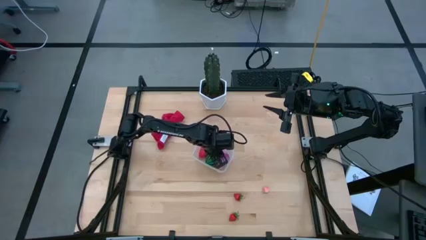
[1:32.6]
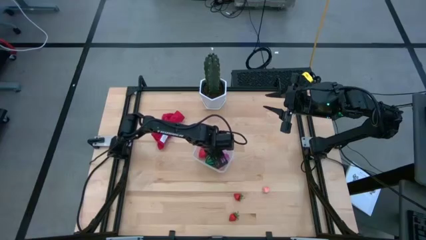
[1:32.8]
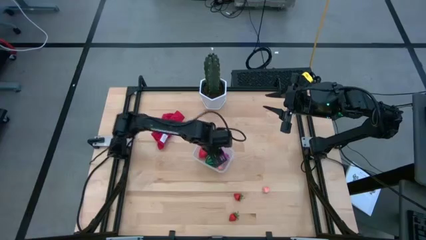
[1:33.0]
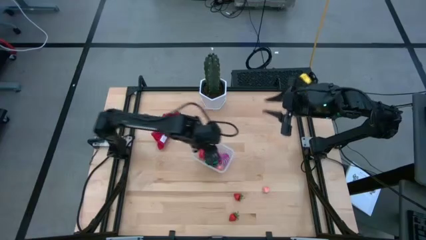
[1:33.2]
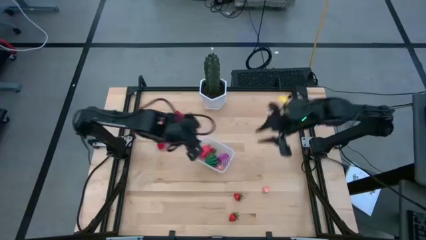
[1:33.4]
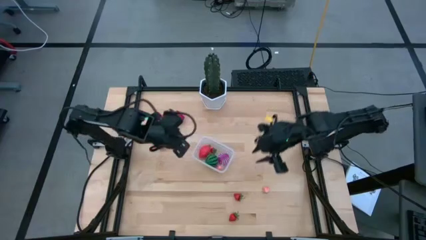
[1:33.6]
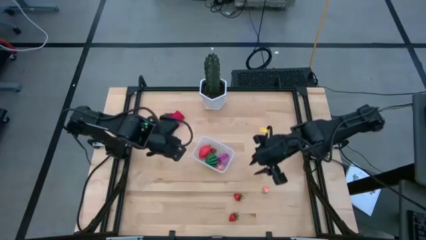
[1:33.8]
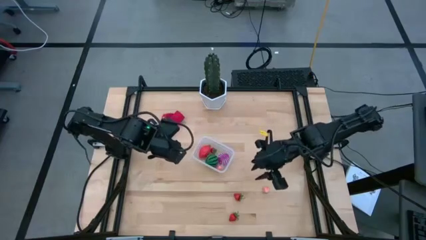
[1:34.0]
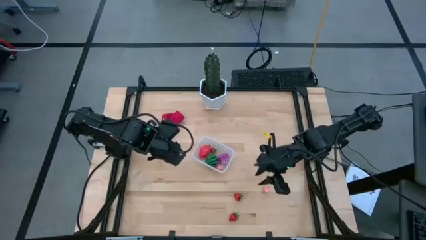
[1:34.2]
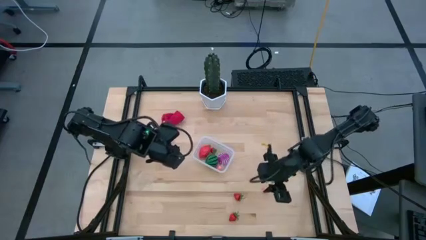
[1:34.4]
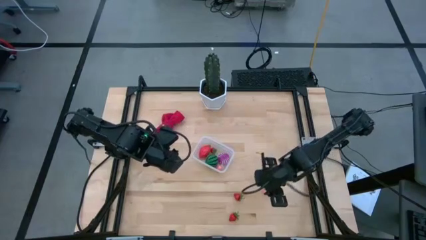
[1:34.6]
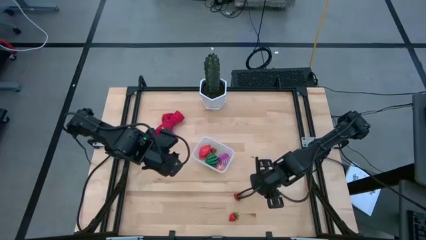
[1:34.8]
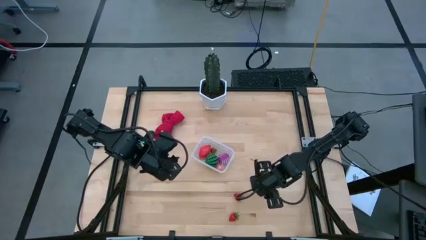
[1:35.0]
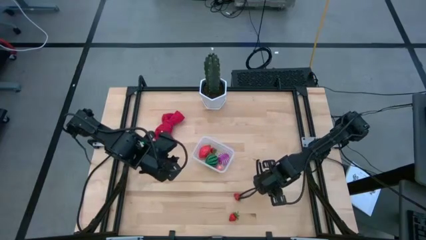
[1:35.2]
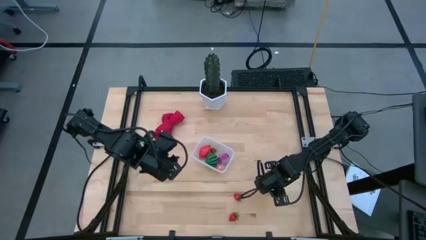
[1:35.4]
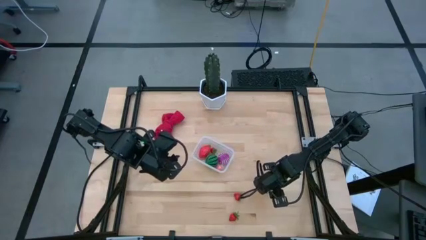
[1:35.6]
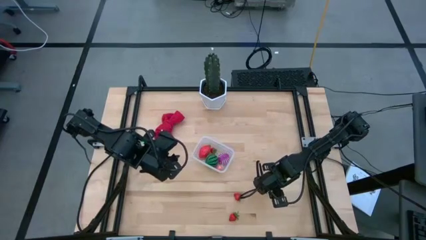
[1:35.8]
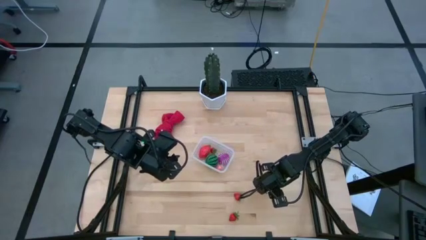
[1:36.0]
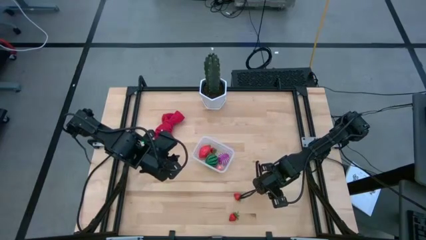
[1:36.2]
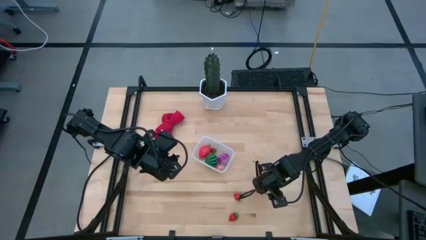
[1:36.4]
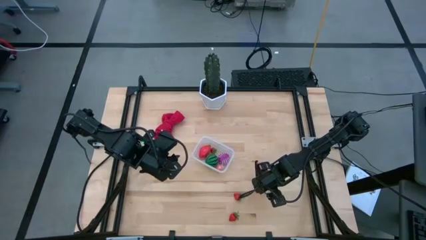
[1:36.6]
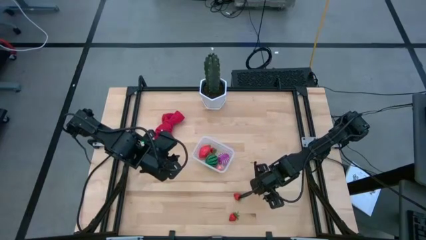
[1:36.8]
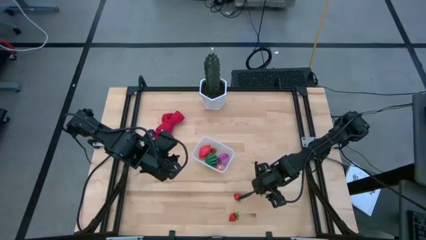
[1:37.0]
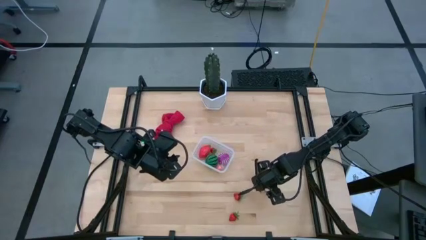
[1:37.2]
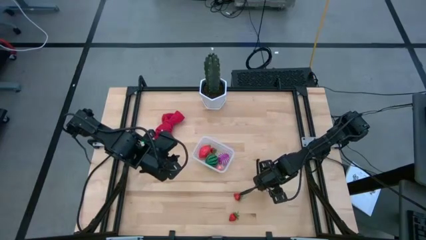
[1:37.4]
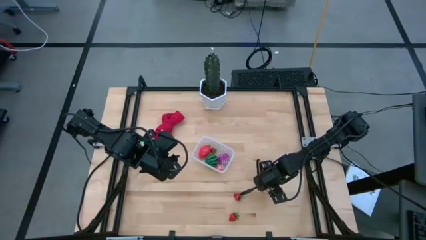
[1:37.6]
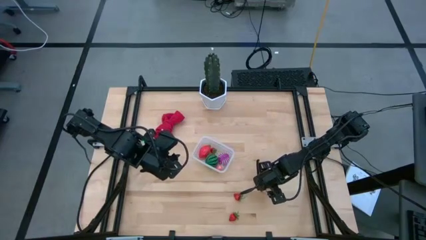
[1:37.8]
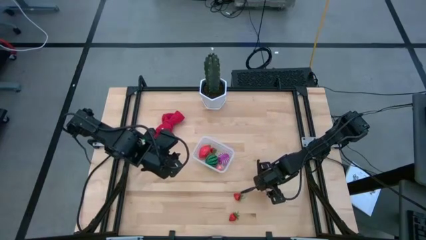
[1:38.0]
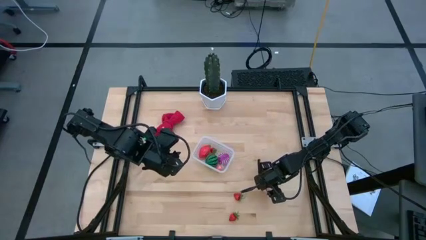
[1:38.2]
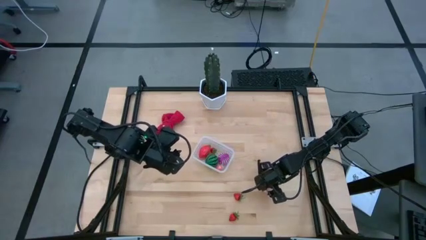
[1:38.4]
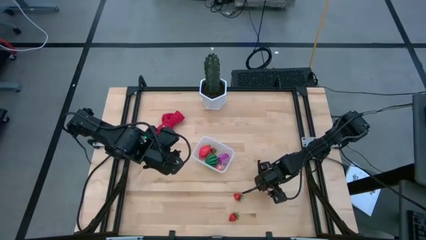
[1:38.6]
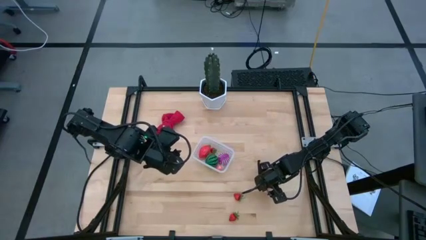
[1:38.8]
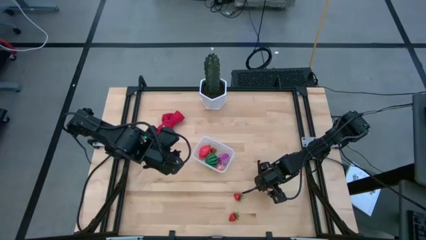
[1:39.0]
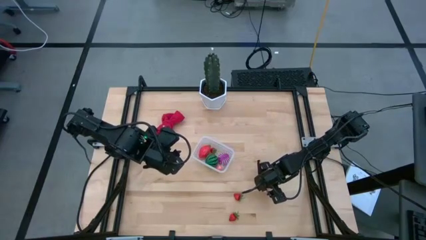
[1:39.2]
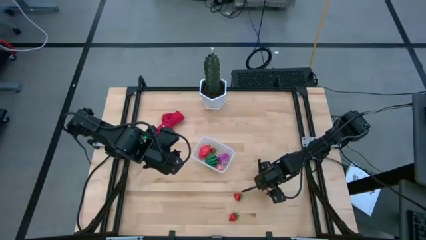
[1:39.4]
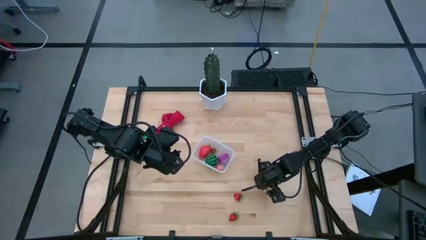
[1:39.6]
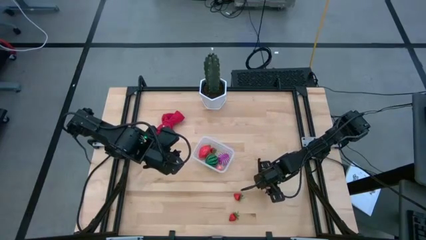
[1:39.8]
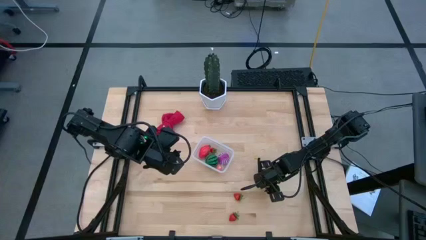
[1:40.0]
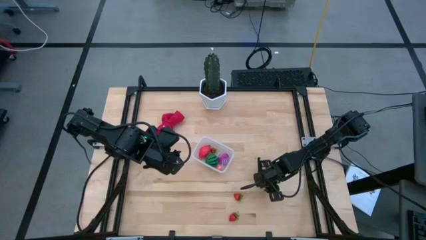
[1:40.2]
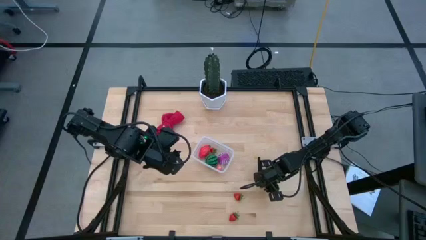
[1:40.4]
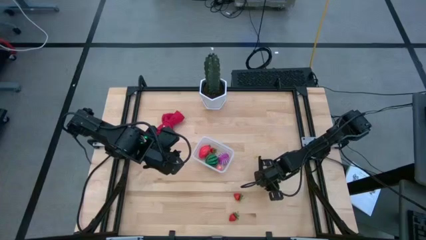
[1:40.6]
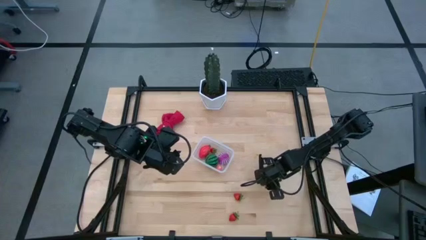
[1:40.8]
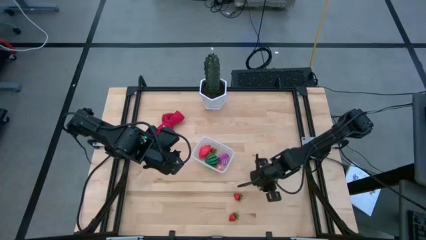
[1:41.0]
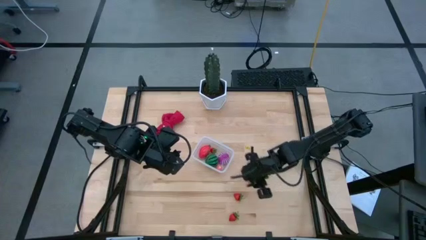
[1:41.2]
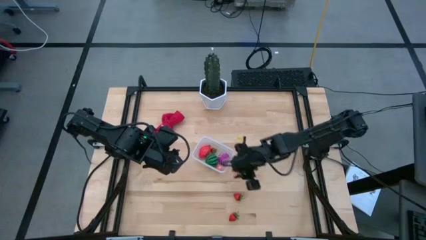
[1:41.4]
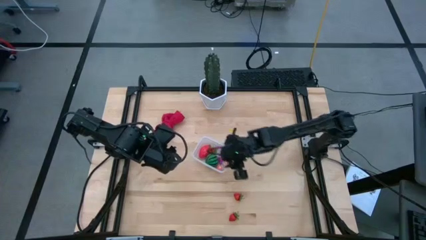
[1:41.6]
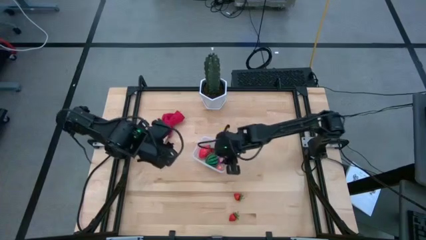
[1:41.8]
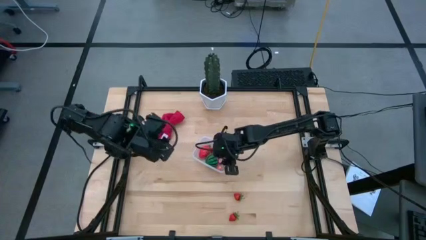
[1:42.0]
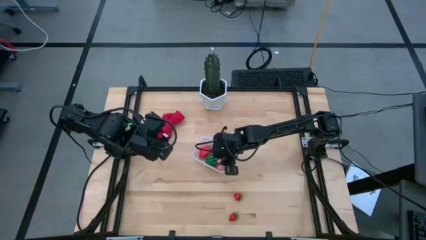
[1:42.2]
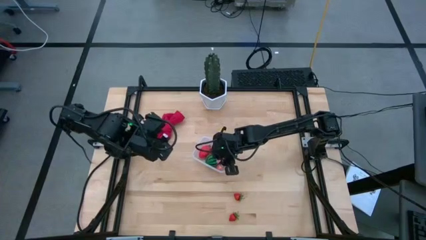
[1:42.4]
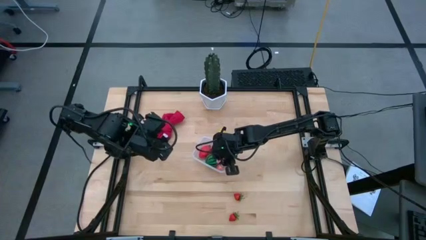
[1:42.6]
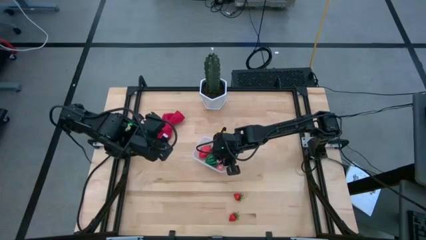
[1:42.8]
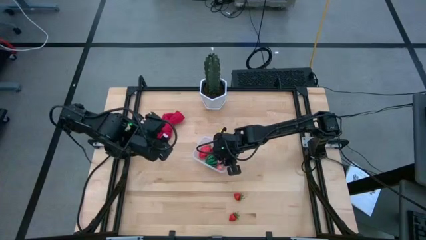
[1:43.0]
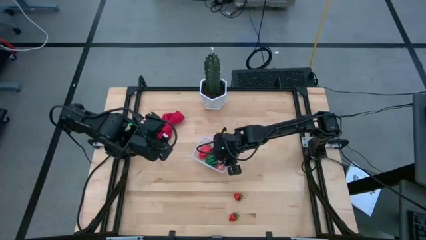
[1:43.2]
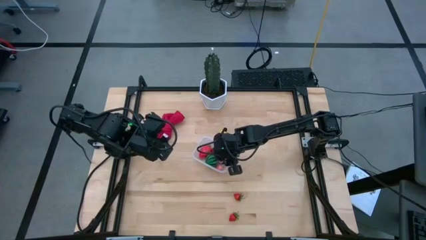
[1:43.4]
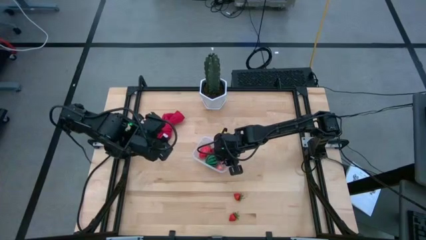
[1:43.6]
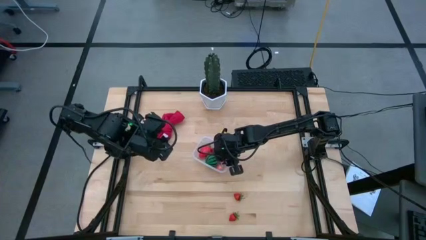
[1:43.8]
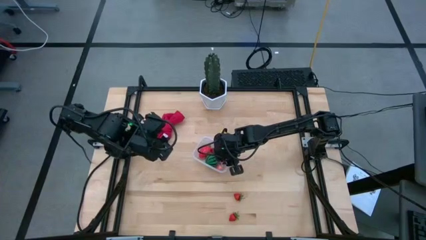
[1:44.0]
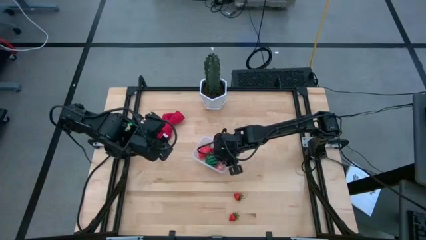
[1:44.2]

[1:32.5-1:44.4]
Task: Pick and placing Produce into tupperware
Put the pink peach into the transparent container

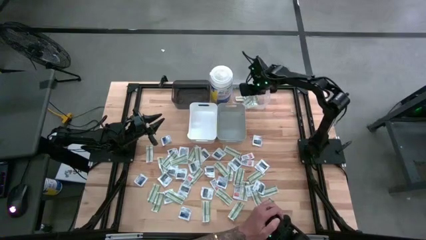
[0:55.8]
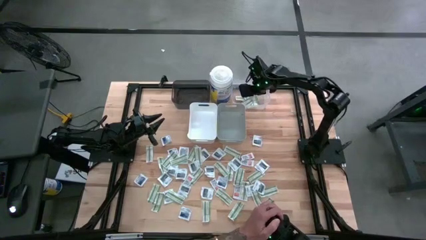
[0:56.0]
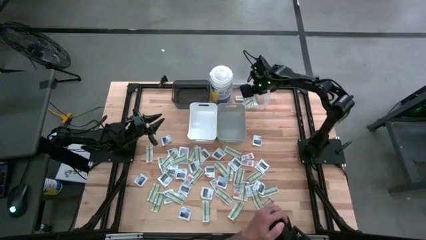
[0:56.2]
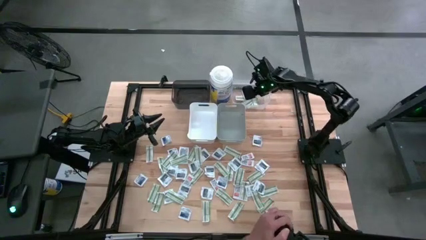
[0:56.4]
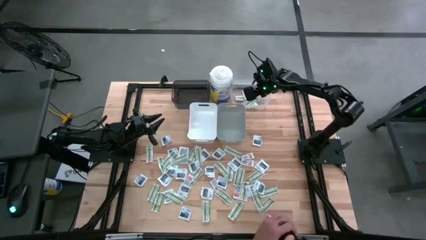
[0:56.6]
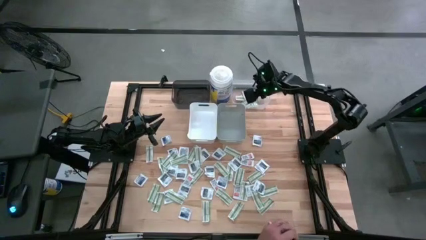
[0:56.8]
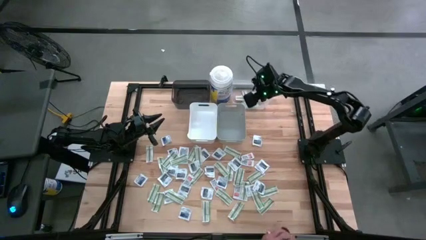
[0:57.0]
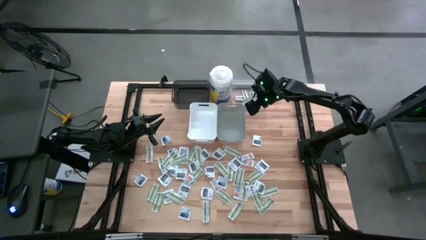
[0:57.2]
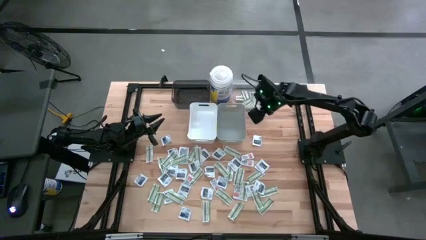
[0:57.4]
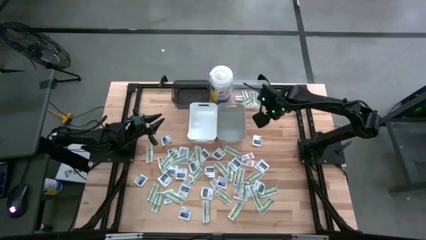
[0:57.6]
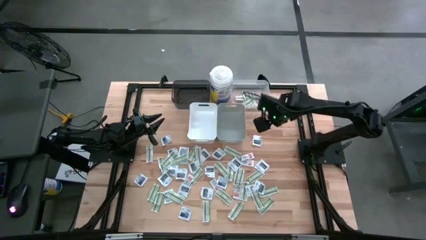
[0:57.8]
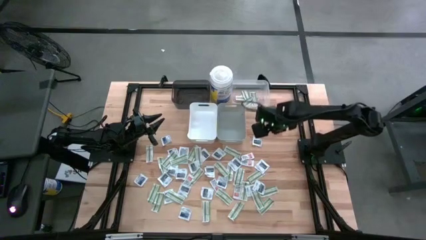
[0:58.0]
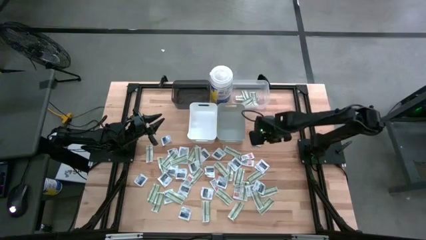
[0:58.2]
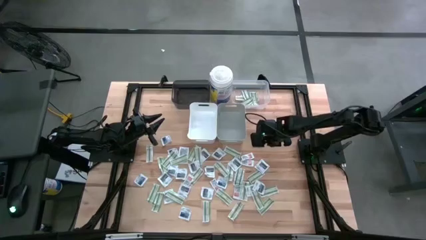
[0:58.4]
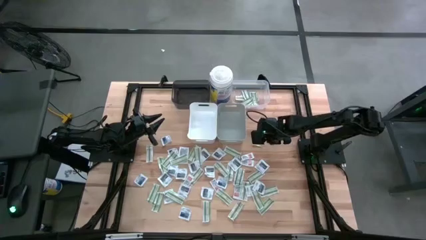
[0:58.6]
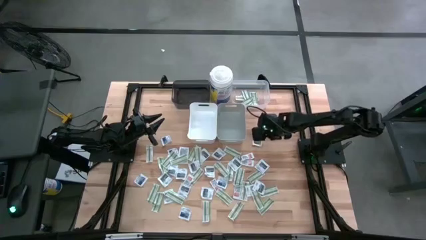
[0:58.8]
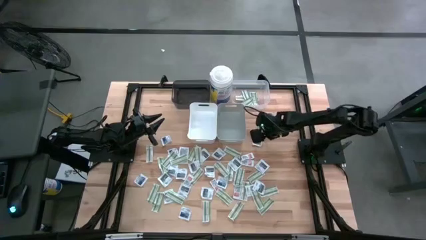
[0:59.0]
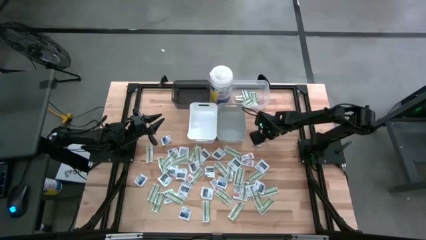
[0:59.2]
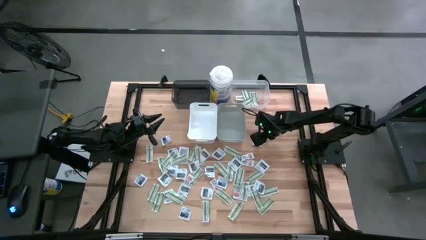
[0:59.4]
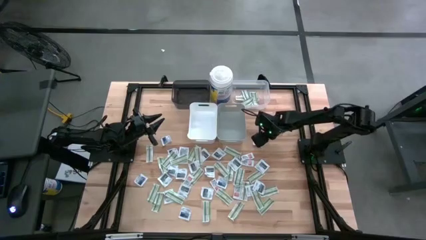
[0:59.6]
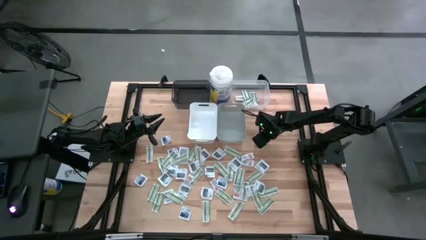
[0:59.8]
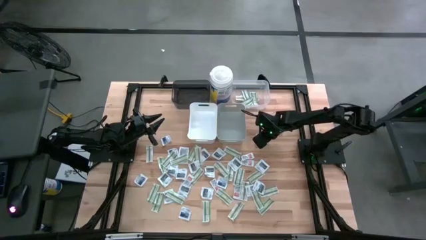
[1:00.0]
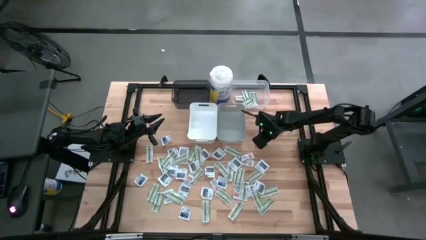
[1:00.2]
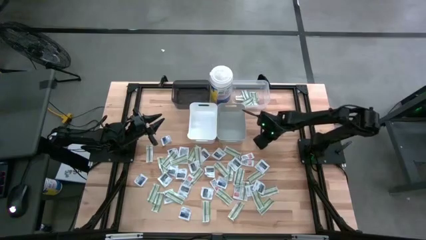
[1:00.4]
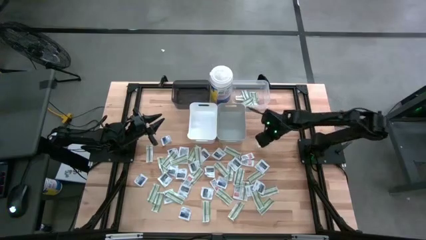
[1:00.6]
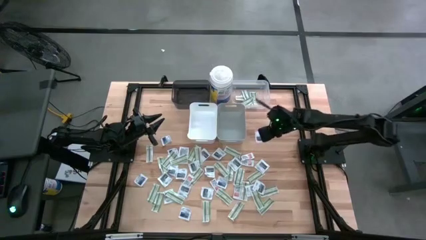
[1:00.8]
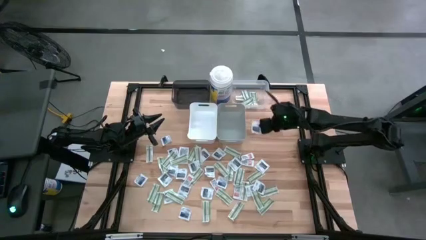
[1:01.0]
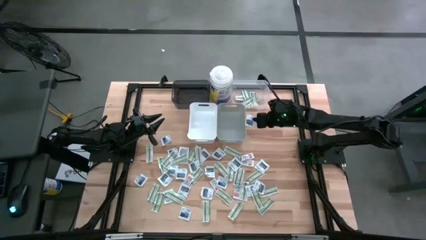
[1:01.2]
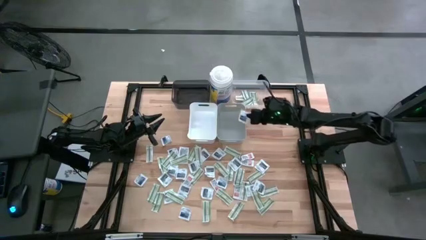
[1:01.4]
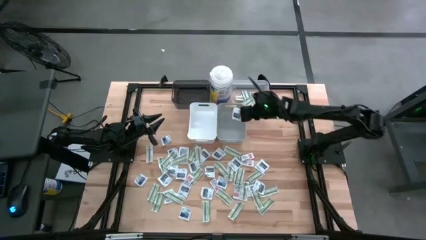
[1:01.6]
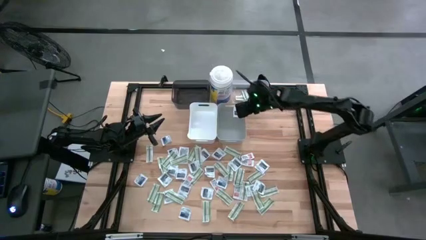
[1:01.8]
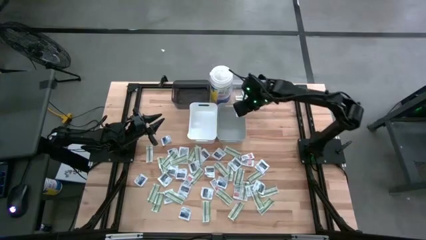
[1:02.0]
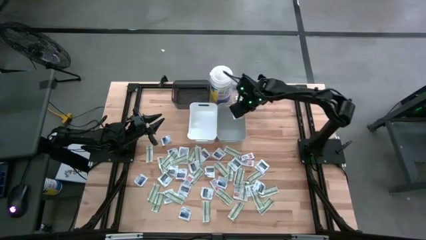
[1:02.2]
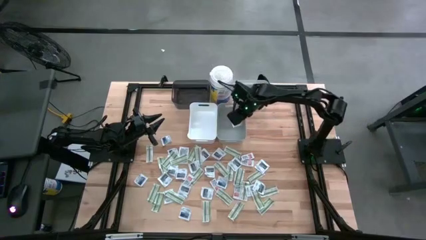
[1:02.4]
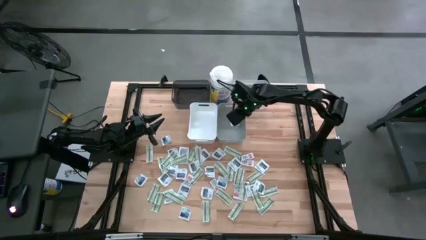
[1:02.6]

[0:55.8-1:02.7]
Task: Pick & Place First Aid Supplies
Put the wipe into the gray bin
